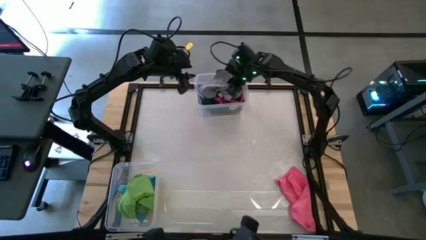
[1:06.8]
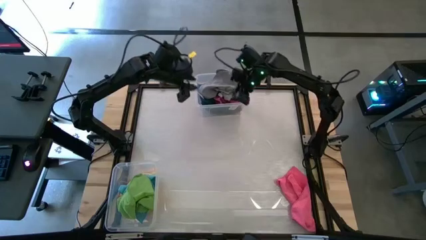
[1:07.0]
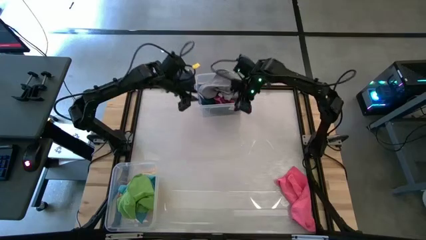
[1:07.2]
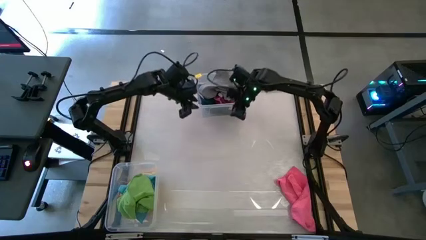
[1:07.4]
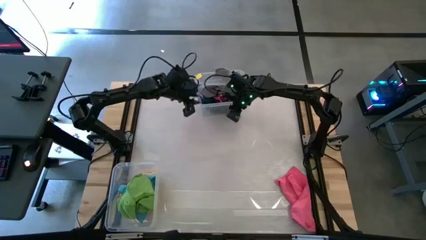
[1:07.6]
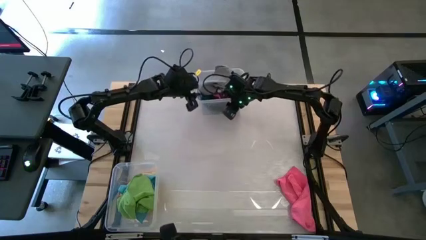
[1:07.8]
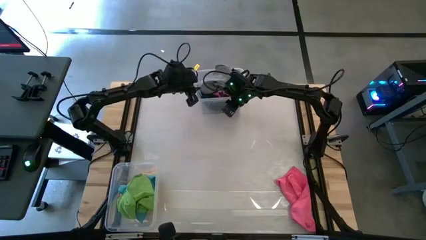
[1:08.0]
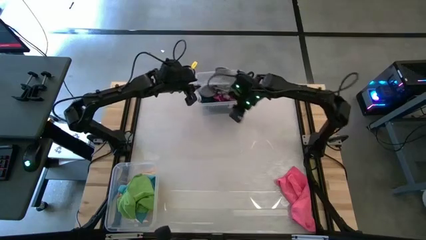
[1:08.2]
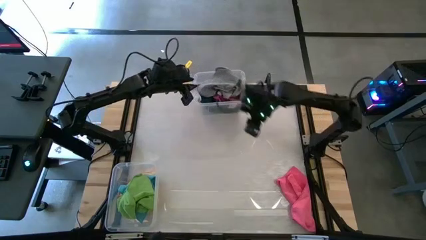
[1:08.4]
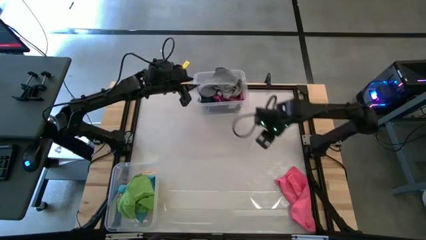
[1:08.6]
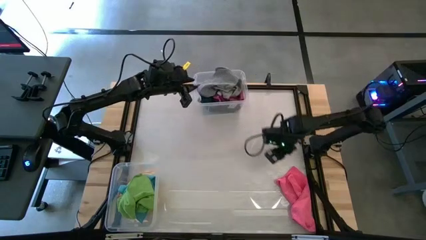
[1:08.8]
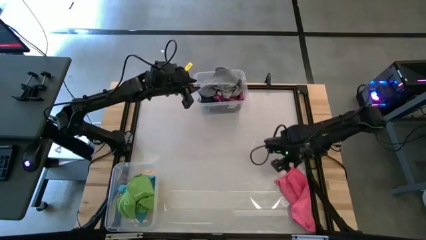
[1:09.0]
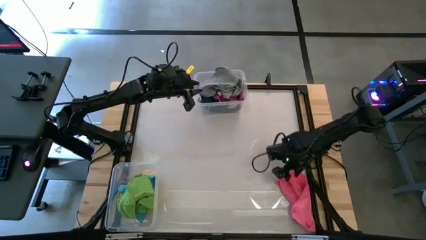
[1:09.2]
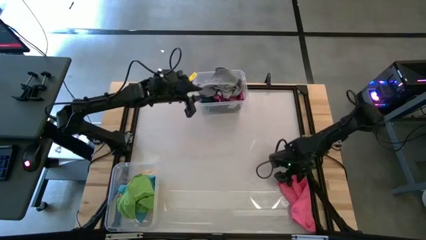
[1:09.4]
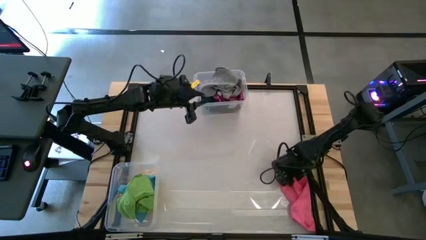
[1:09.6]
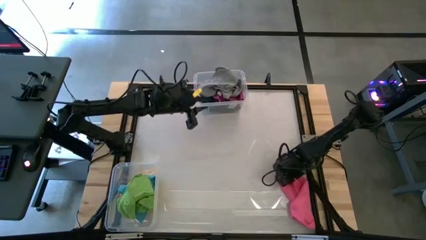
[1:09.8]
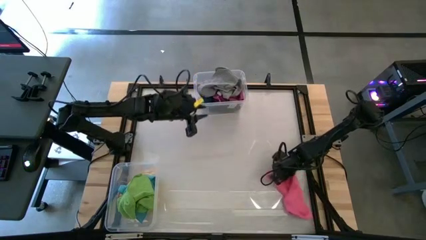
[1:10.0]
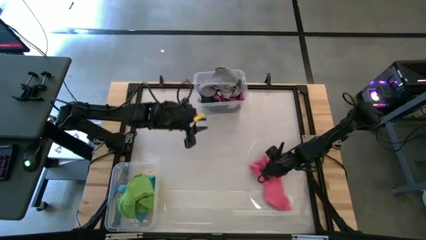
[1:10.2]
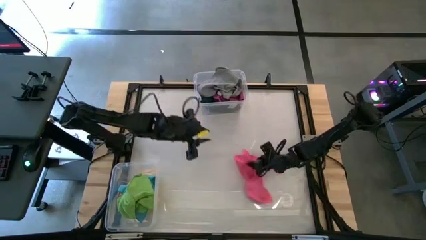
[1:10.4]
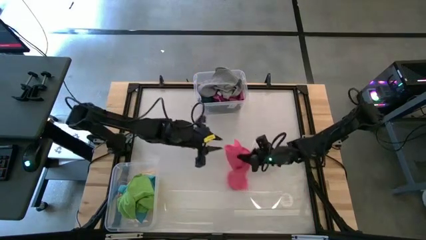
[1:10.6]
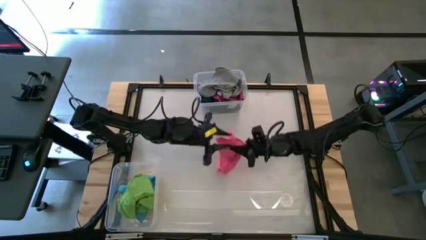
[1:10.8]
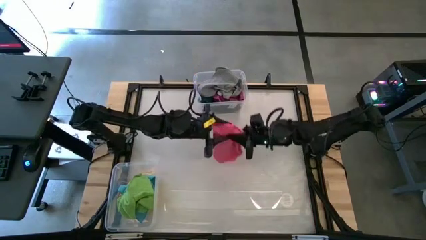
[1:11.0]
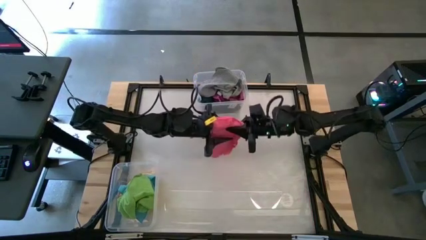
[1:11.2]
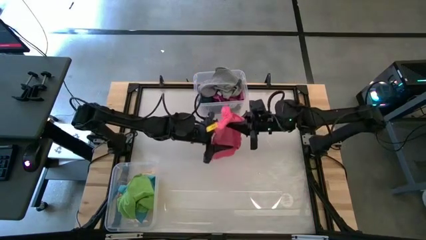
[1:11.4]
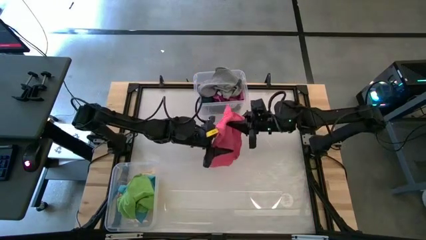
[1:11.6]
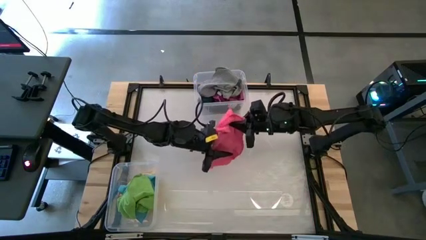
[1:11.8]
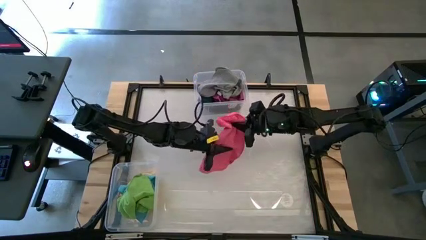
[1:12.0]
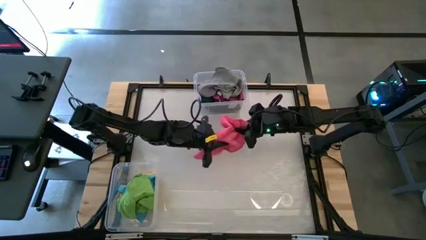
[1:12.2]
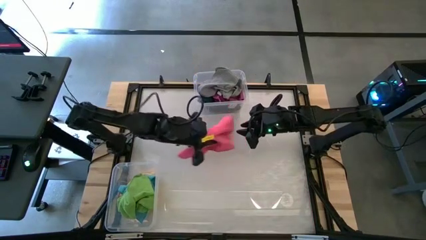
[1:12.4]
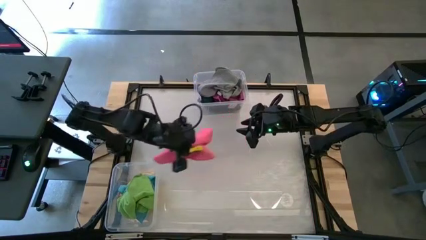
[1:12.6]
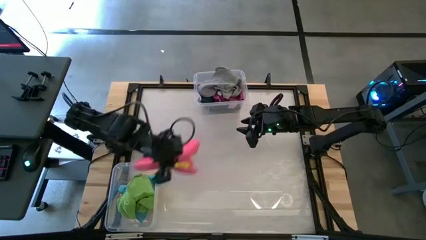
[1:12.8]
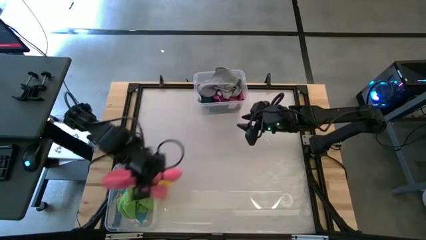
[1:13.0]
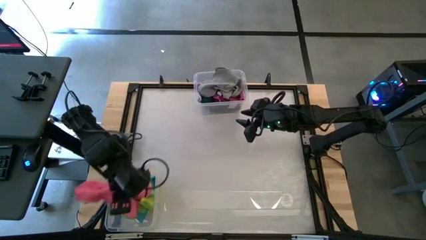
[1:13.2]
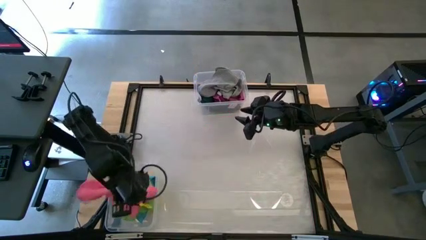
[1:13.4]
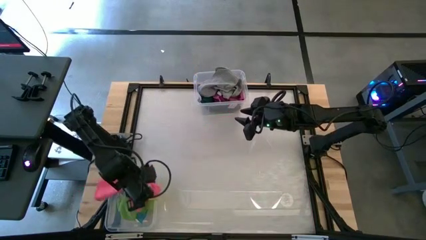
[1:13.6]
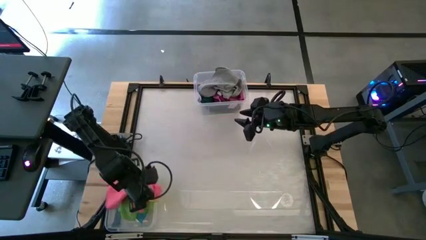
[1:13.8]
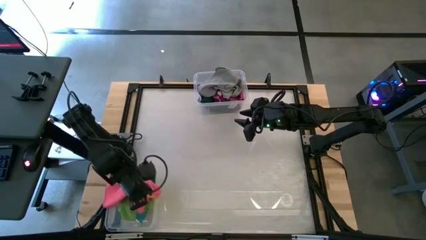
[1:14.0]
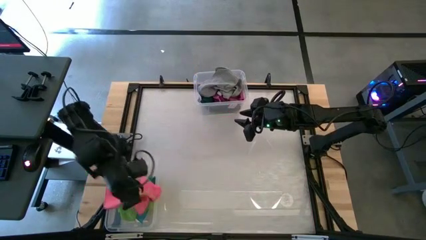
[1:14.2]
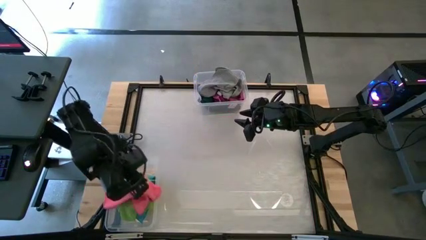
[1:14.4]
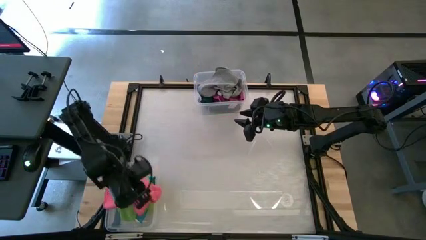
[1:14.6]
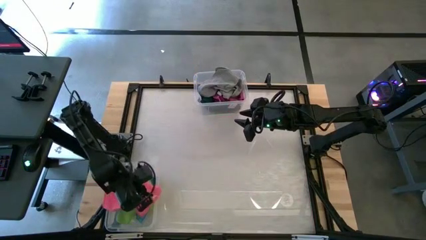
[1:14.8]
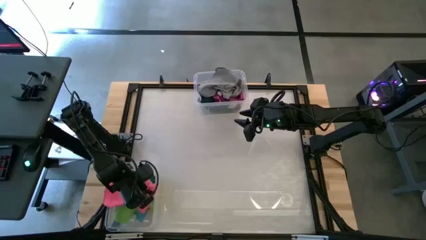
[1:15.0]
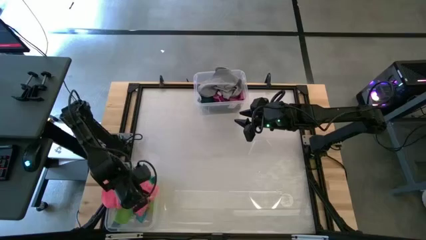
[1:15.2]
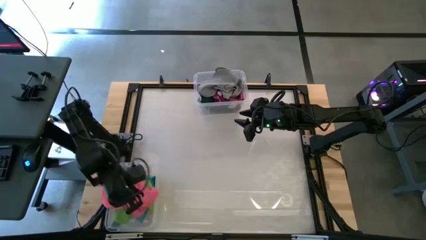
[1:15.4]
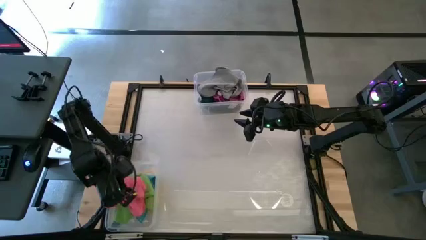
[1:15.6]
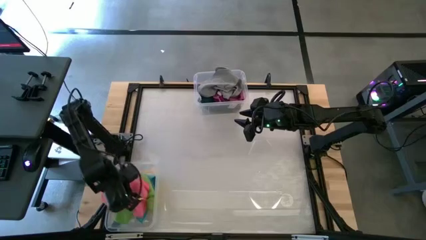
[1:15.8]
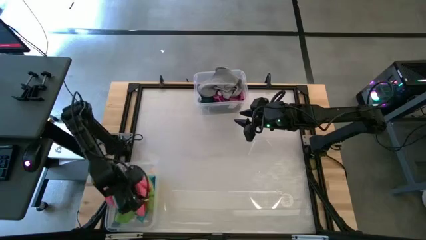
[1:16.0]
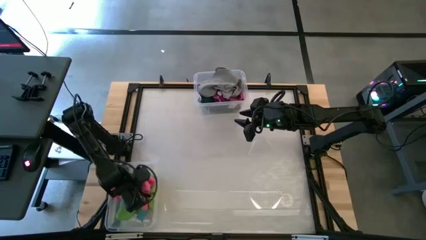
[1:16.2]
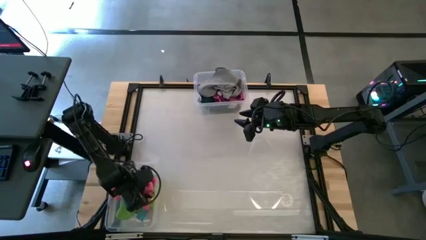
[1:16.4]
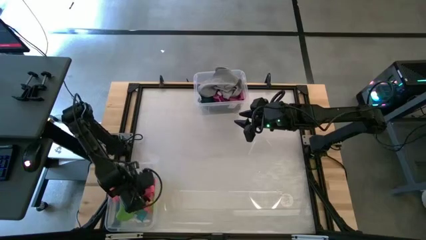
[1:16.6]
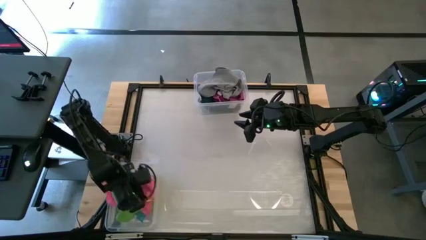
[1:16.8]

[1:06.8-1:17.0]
Task: Sort towels by color in basket
Put the pink microfiber towel into the bottom transparent bin

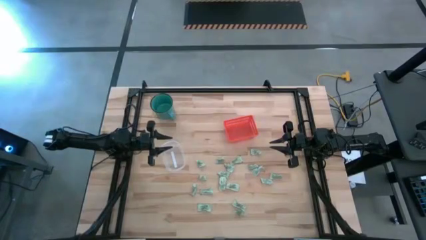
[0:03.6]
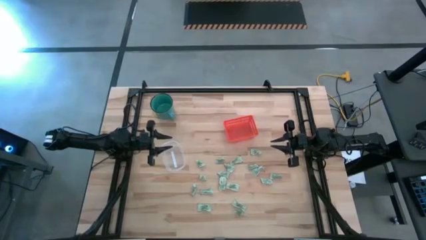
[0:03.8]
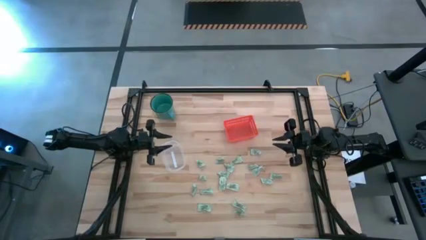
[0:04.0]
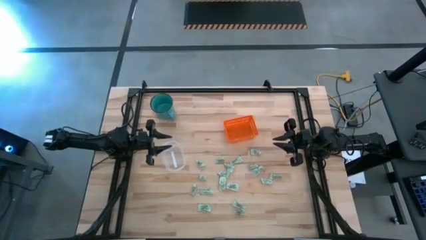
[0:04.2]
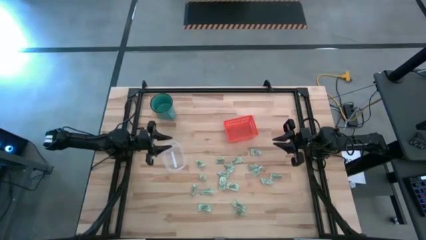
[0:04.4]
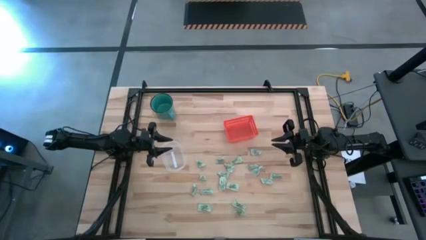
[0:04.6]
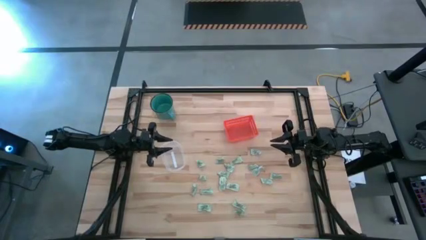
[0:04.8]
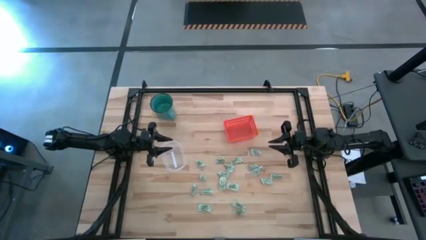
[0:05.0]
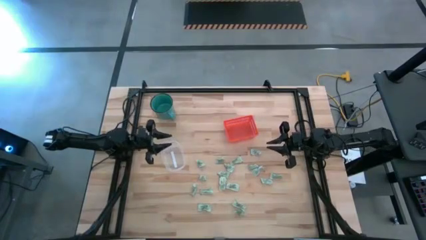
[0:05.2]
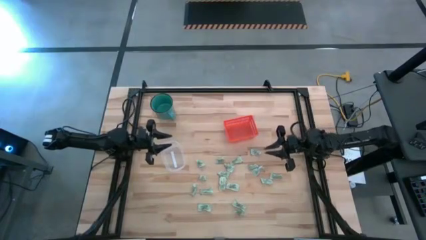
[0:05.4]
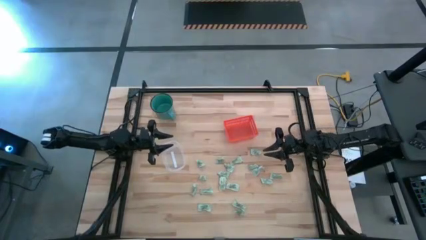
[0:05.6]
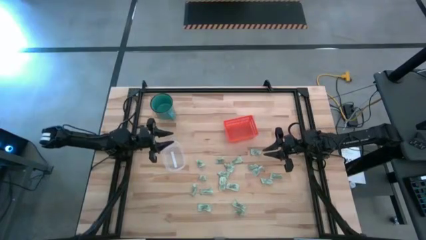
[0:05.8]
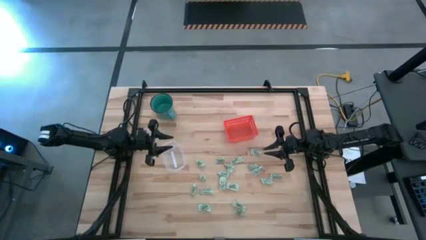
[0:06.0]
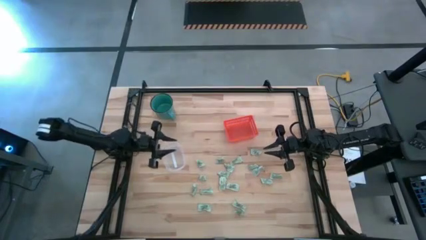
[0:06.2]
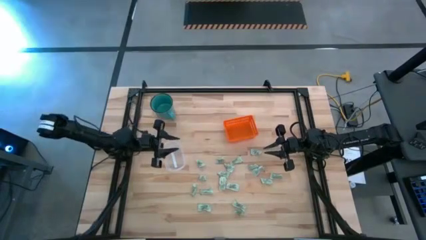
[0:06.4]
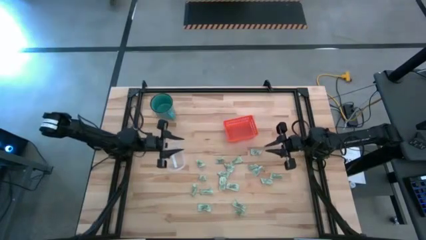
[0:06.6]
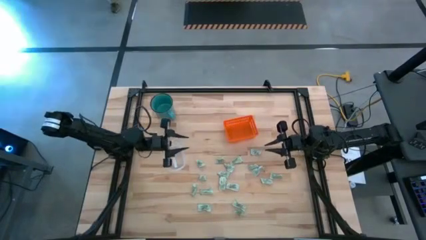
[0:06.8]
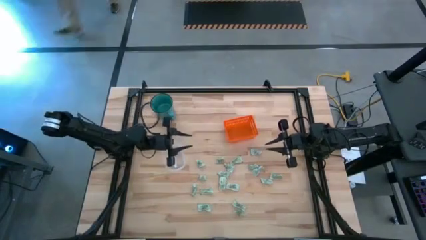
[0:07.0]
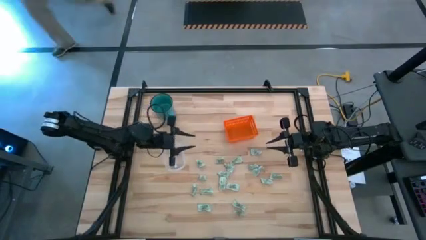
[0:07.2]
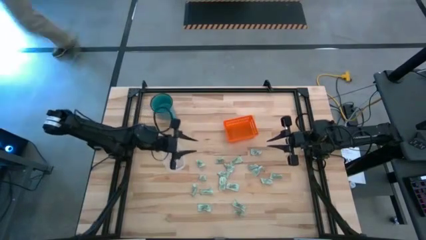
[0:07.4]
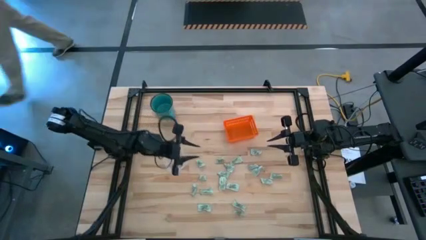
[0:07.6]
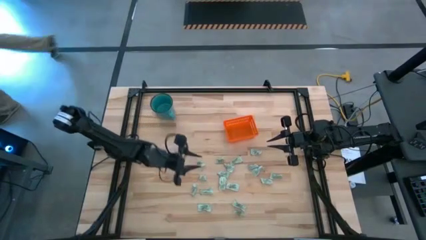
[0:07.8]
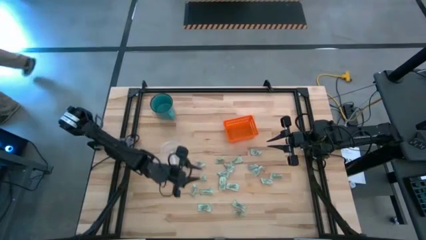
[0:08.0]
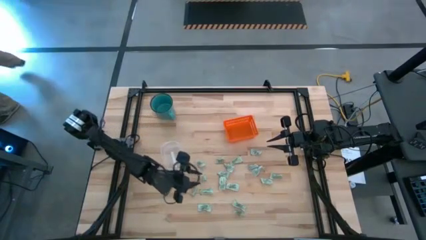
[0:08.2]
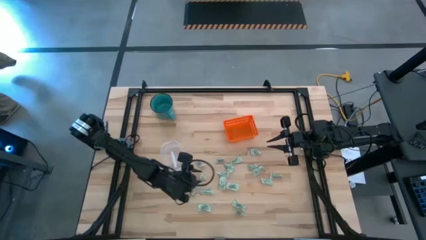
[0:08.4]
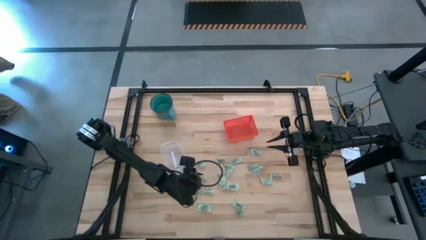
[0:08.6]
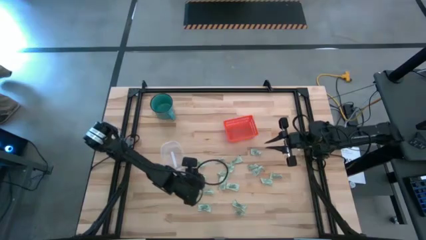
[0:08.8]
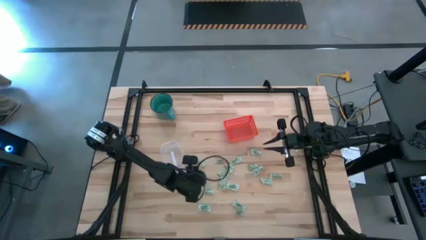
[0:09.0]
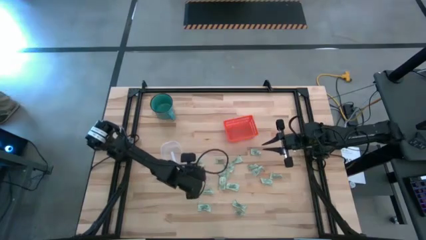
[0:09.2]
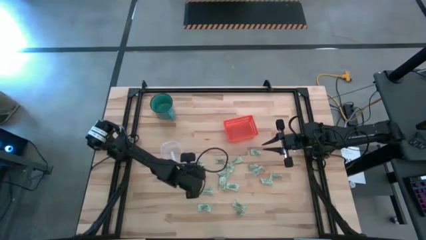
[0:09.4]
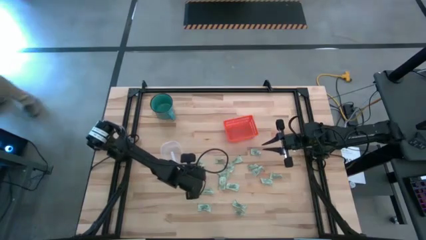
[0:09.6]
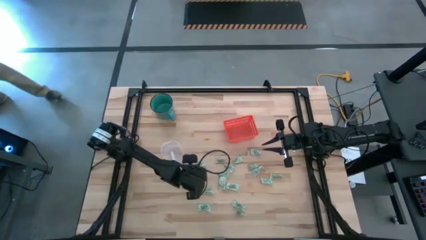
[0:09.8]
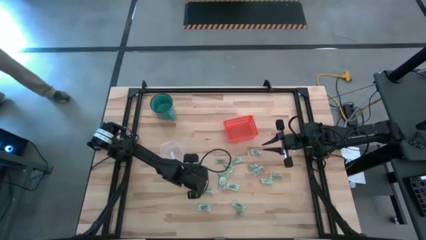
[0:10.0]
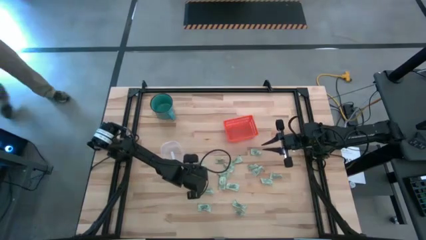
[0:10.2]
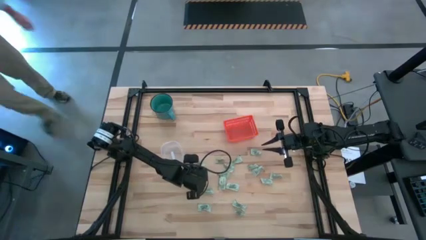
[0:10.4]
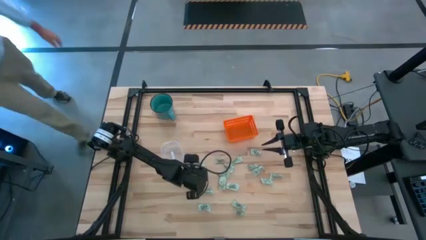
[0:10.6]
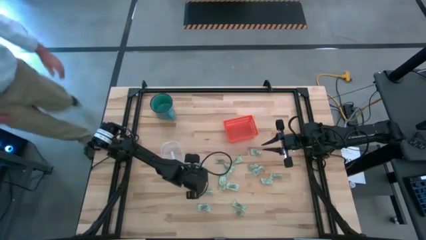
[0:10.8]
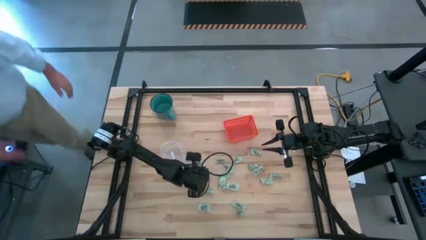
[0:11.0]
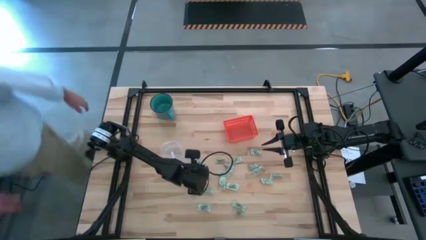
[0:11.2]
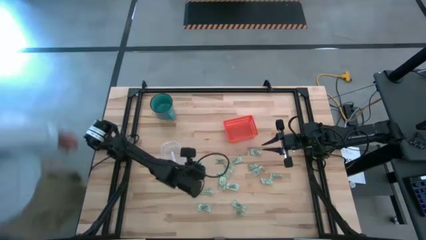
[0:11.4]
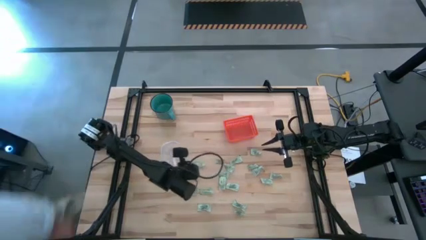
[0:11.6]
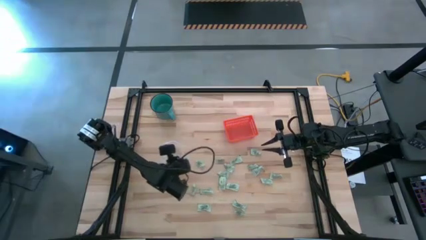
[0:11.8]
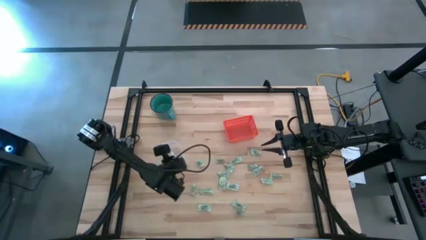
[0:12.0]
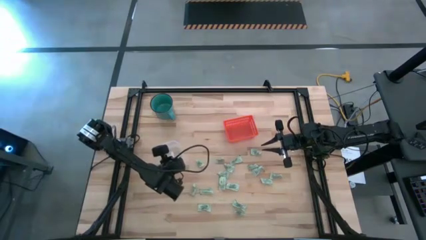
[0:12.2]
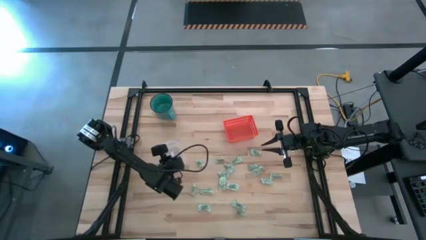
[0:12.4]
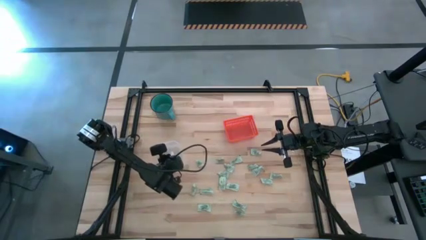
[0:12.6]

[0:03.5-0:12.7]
Task: Pick and place items into bin
Put the light green stevia packet into the transparent container
